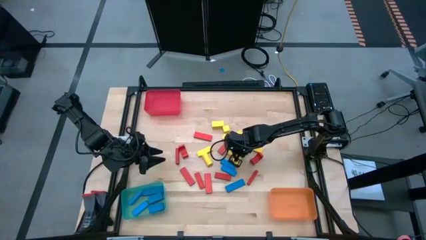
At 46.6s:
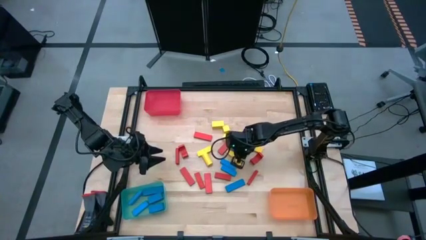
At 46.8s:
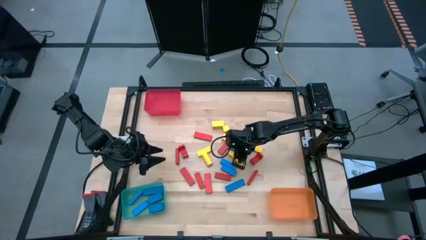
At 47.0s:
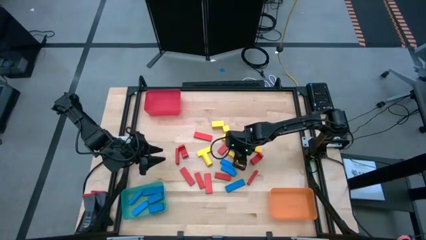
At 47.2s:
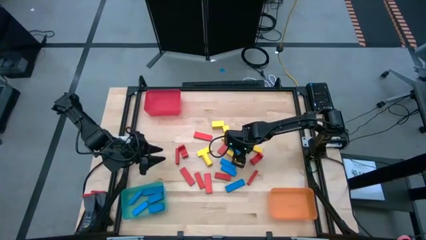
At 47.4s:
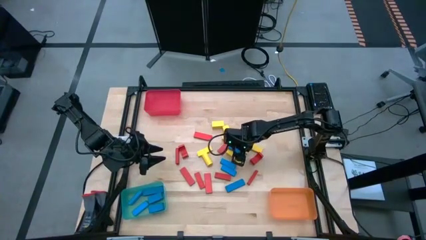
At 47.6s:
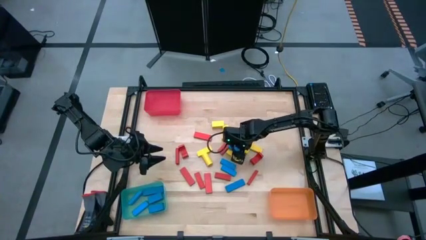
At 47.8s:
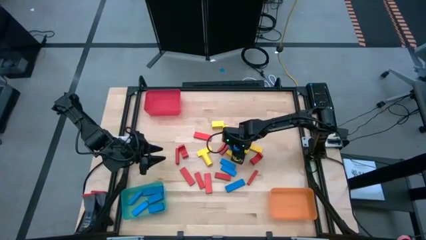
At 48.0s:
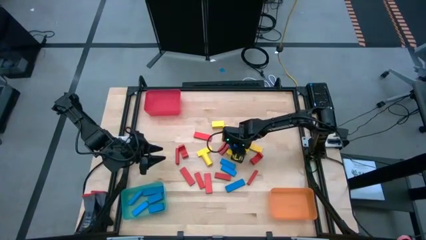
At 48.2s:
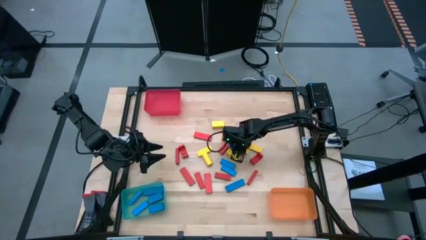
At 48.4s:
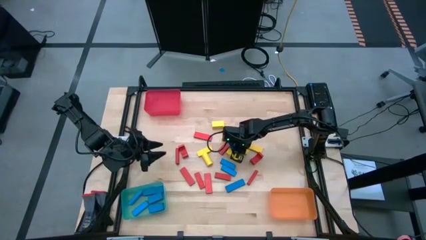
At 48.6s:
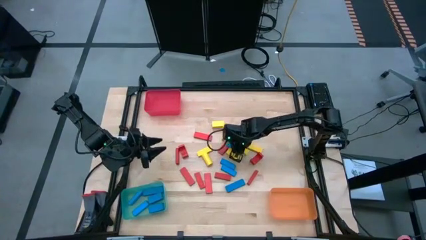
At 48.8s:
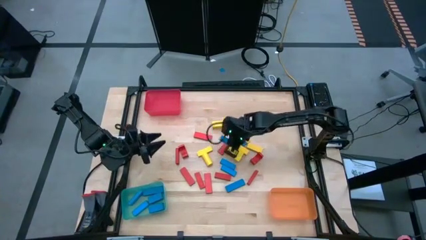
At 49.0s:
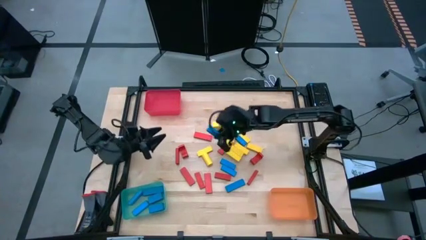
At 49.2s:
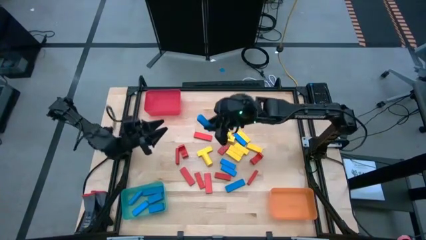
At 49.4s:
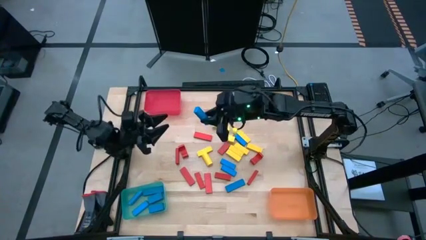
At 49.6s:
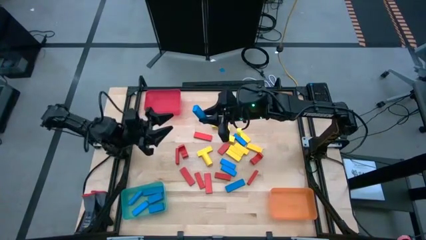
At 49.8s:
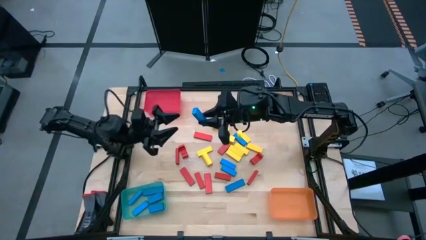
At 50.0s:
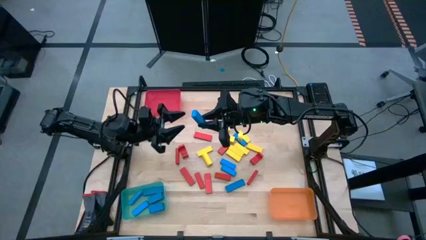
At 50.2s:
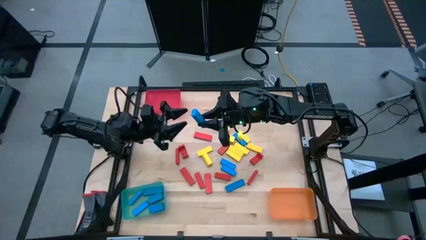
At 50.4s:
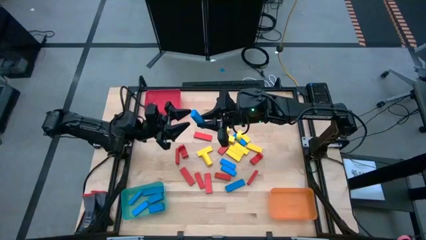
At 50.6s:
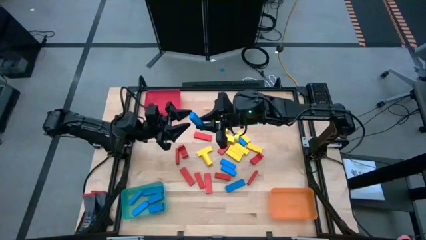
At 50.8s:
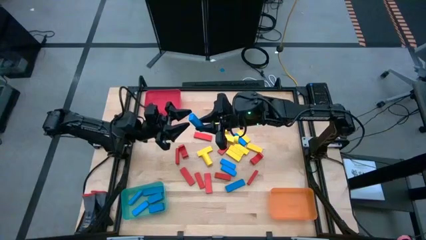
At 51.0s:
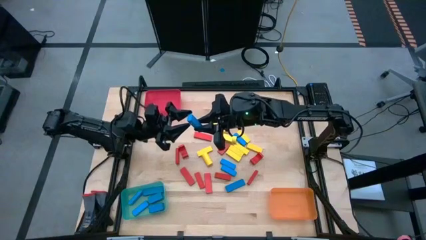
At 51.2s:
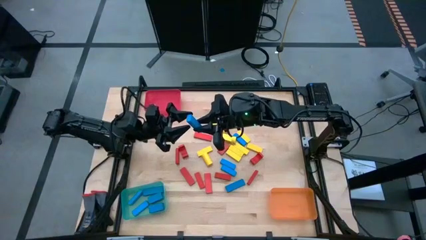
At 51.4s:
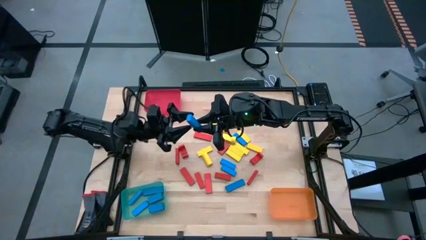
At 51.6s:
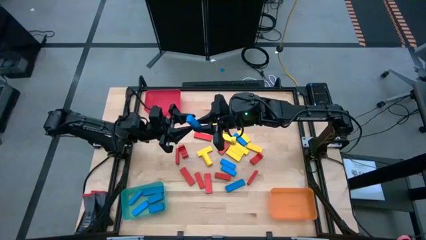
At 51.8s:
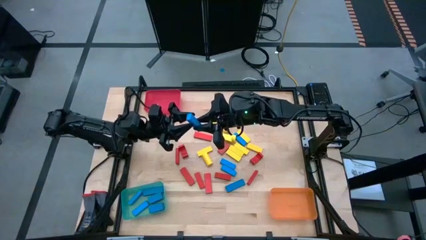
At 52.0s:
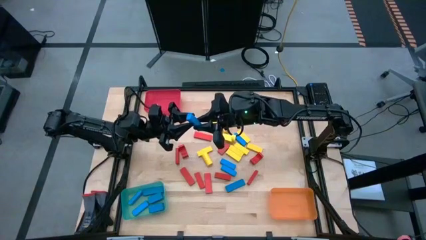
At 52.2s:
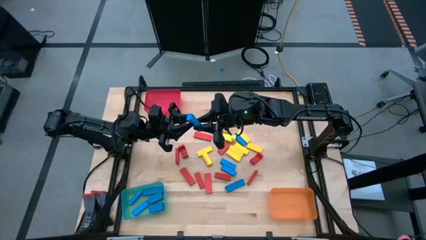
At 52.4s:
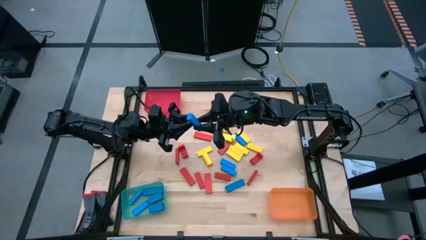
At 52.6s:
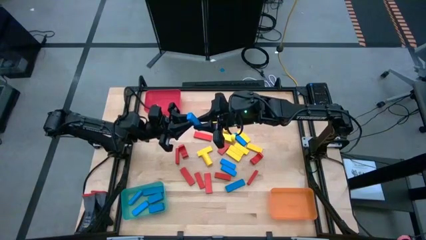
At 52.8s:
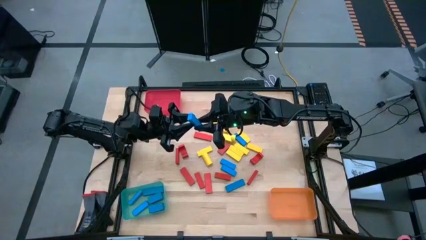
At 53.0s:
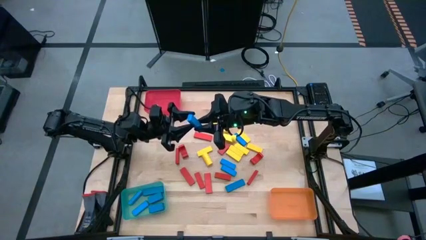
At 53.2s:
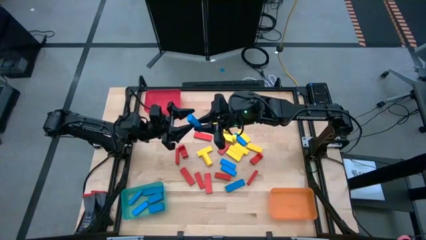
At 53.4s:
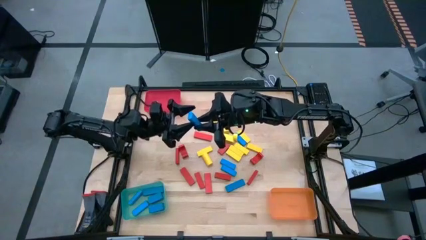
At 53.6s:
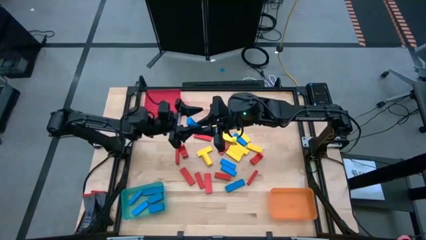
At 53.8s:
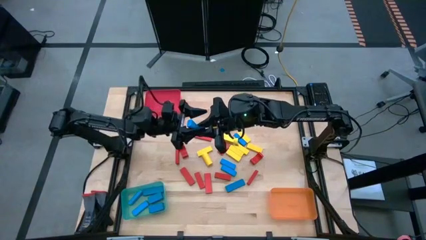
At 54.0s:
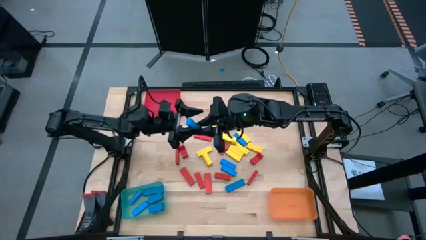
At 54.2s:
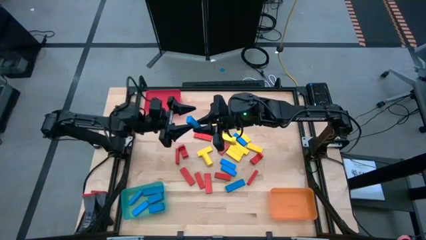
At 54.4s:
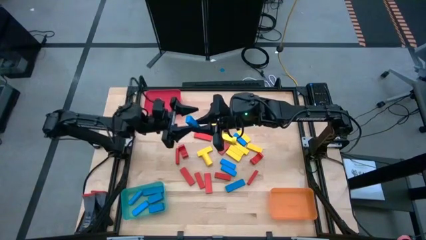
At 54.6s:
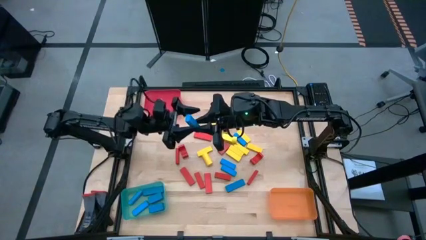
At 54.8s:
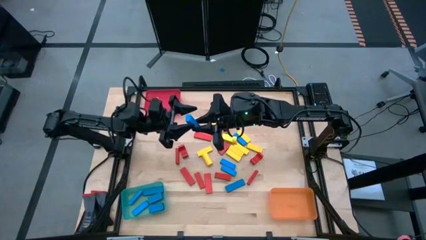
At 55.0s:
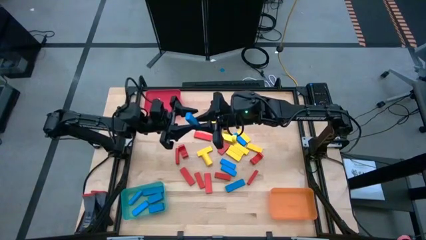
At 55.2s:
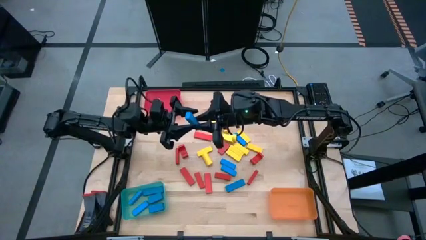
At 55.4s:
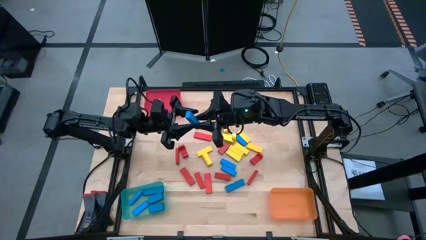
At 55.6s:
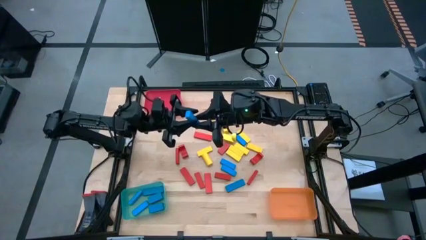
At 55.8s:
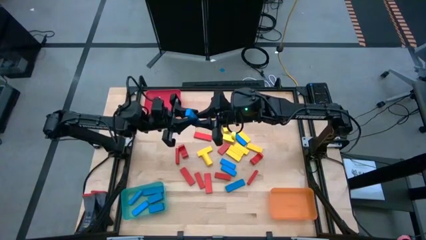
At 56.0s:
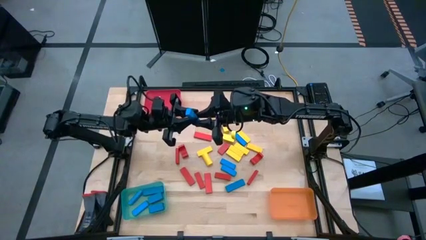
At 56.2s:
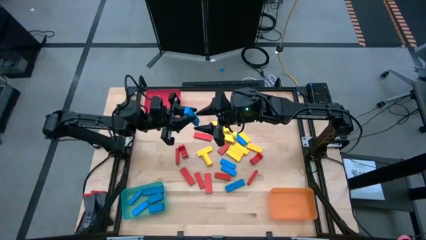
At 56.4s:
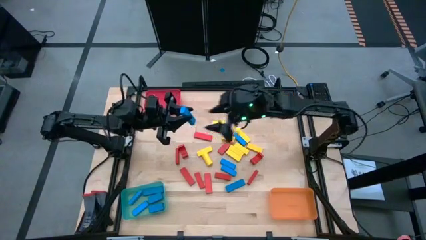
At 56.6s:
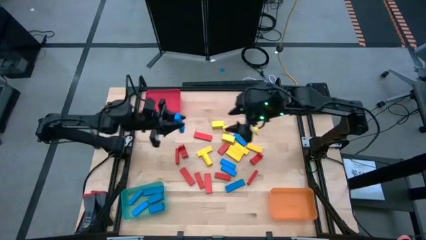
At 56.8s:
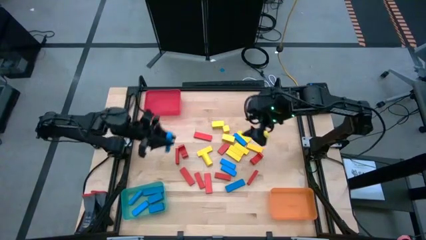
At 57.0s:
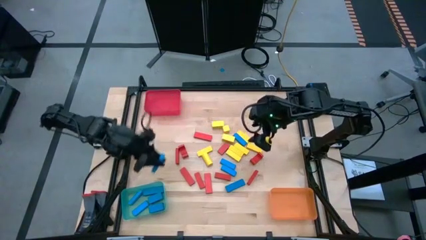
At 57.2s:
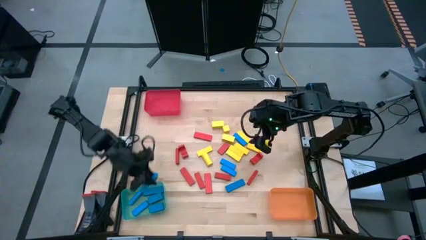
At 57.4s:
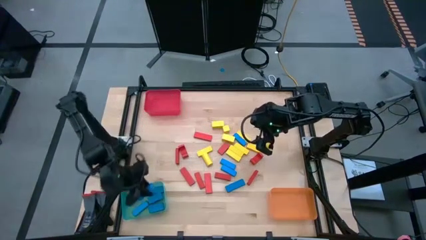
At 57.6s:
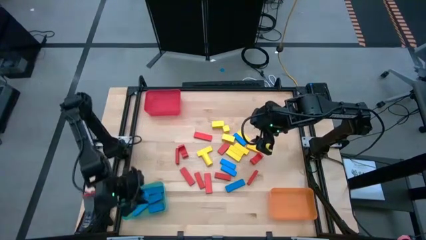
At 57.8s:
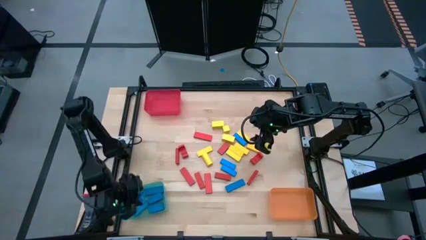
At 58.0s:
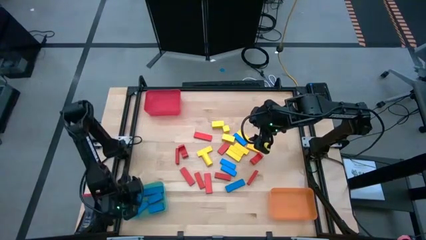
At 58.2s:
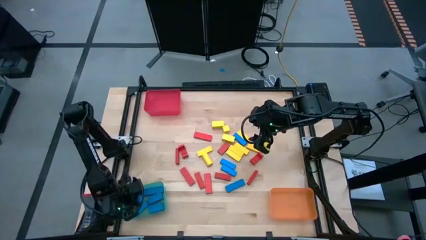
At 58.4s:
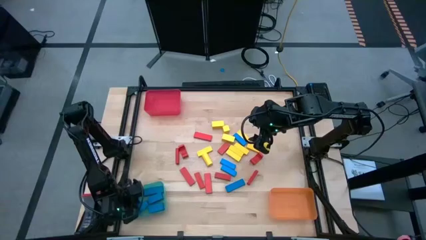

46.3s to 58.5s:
Task: Sort blocks
Put the blue block into the green bin

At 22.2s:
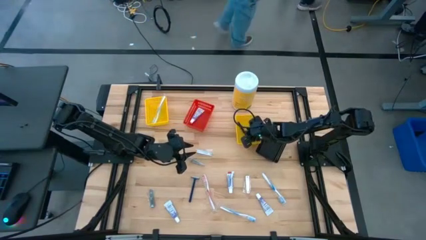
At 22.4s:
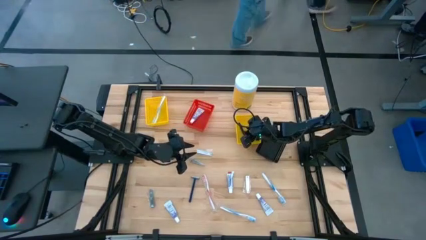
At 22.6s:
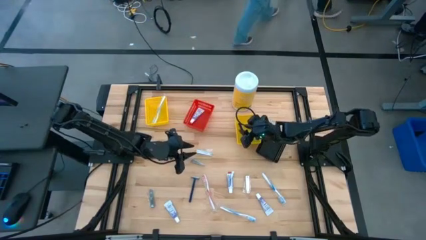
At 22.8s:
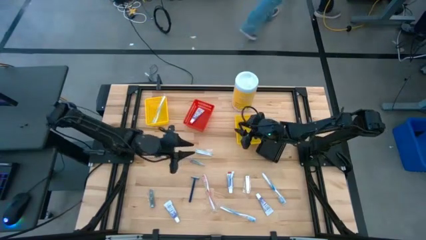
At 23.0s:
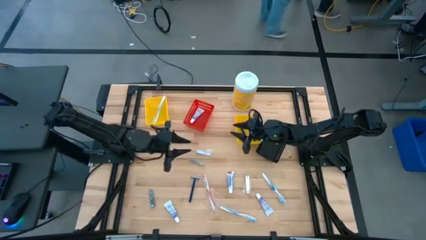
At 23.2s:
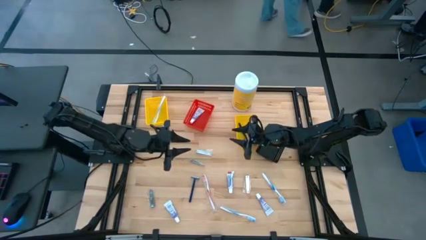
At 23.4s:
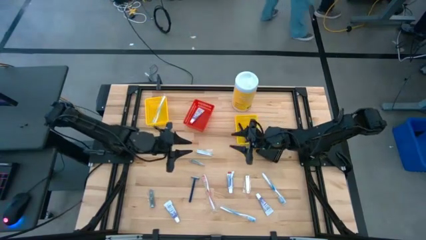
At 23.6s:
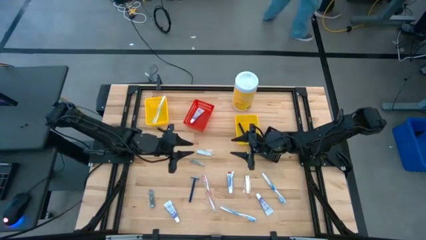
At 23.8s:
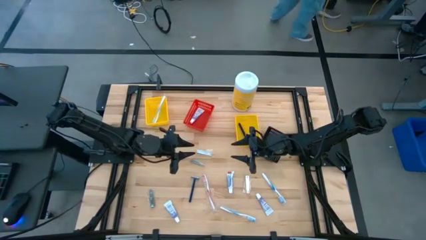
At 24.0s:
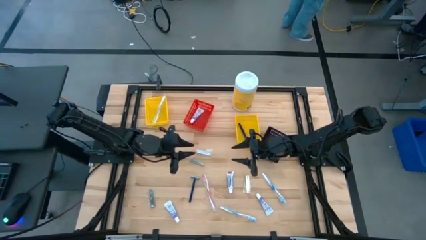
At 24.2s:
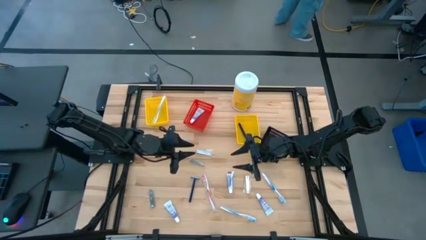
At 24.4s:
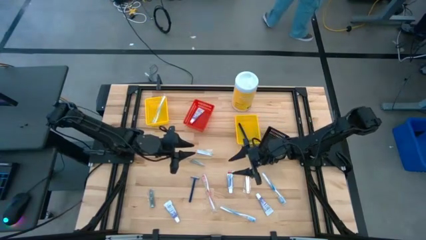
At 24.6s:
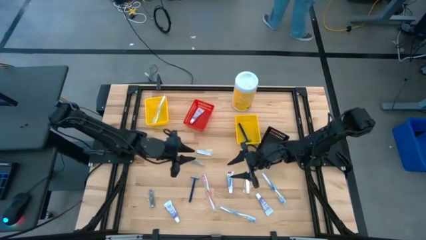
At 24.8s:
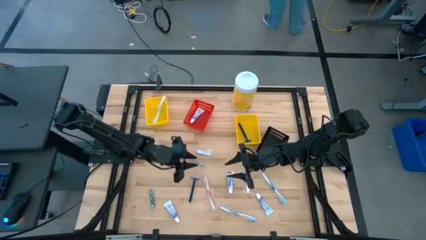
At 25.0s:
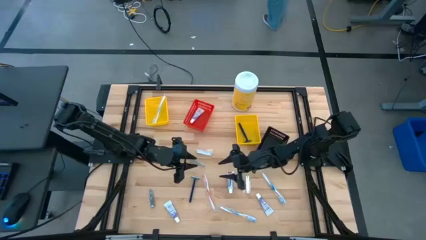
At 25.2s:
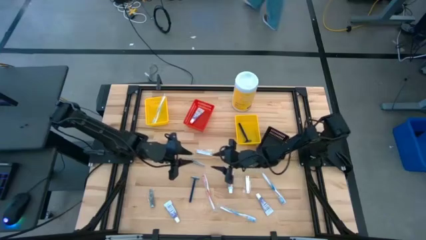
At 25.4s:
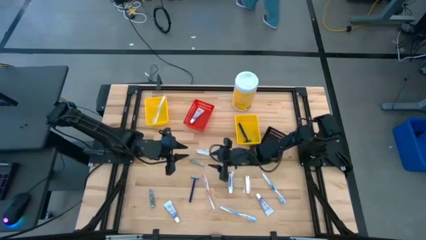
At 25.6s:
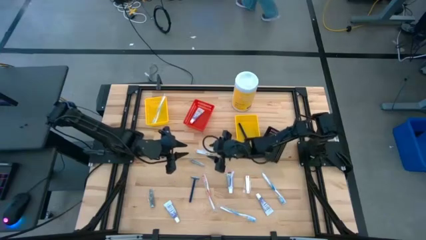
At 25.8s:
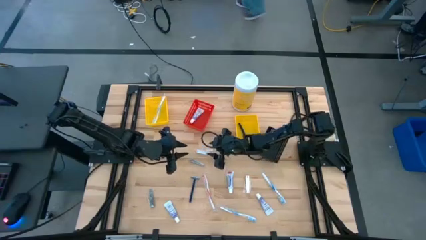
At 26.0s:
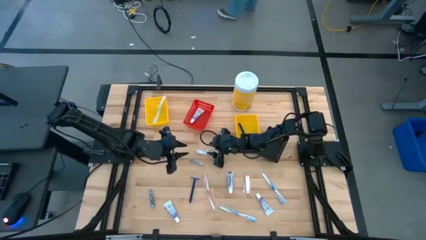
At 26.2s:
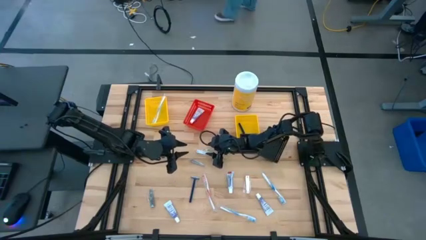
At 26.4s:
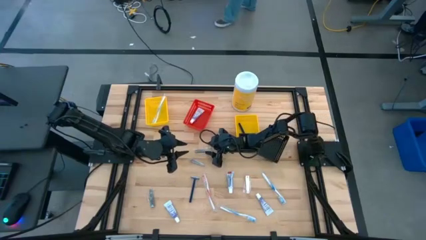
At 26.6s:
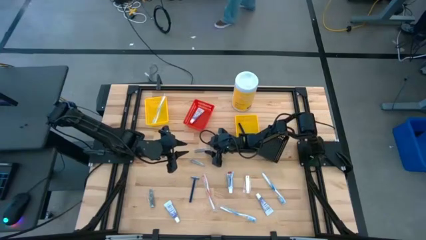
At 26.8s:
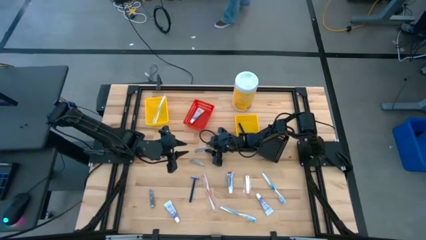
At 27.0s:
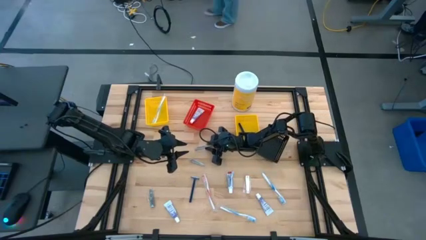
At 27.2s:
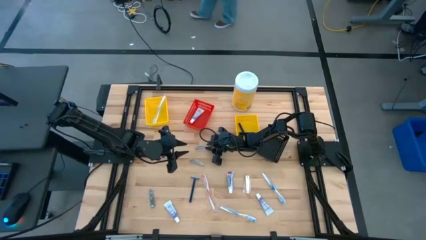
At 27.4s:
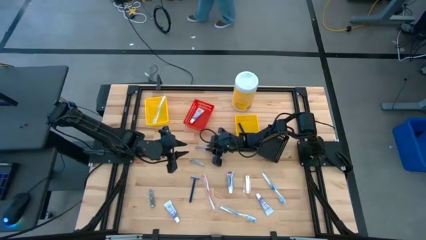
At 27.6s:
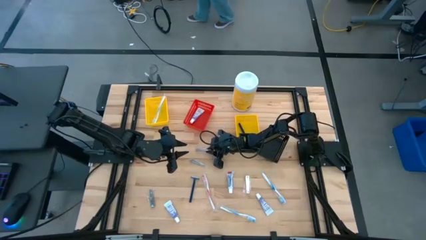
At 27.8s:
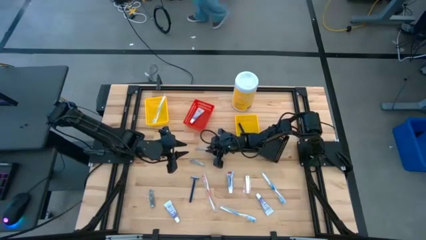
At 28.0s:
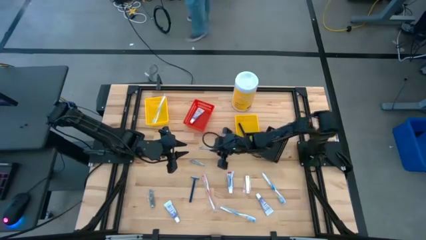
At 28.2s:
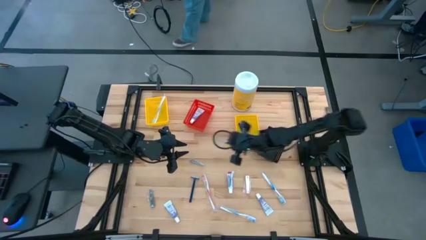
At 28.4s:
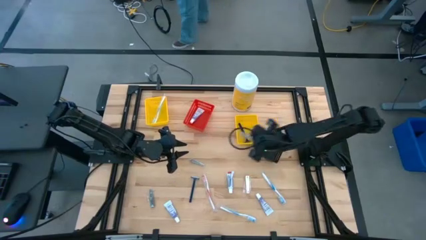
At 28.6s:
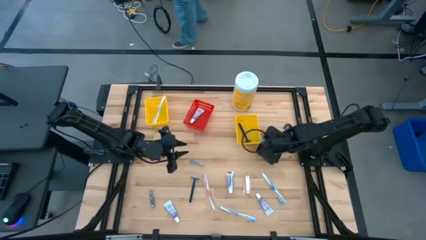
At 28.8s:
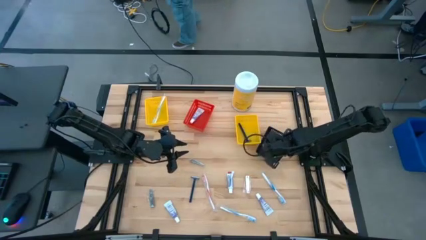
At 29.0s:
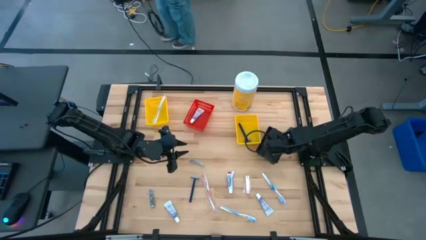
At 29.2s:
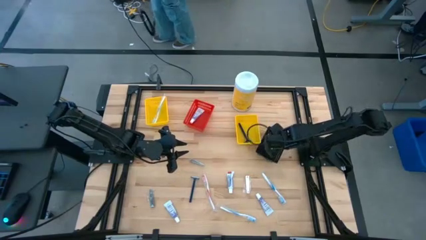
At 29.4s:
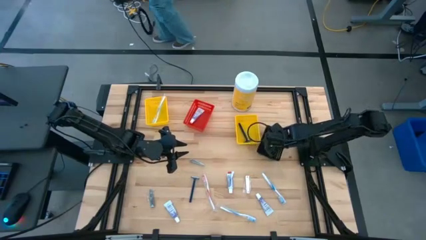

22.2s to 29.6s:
Task: Pick & Place Travel size toiletries
Put the silver nail cutter into the black basket
